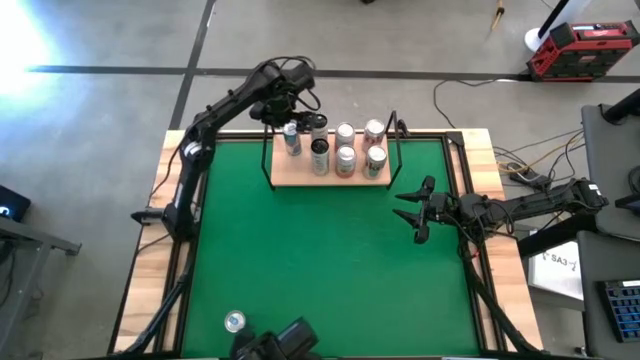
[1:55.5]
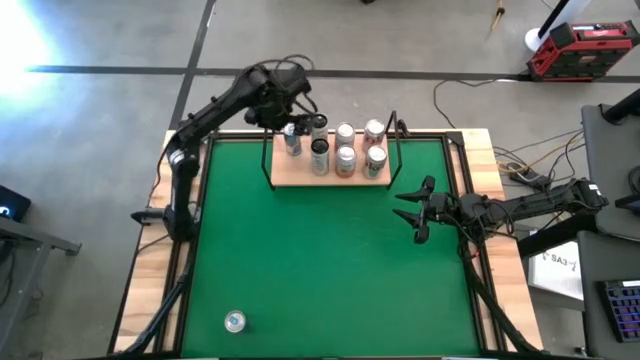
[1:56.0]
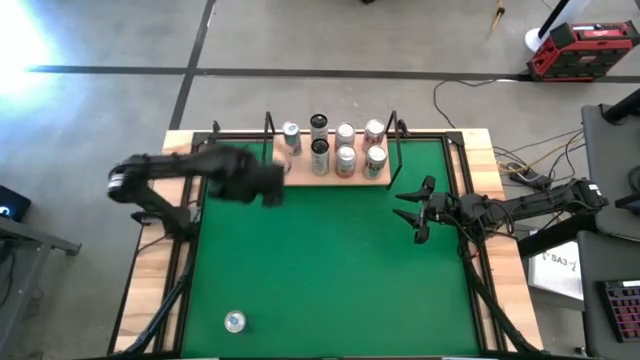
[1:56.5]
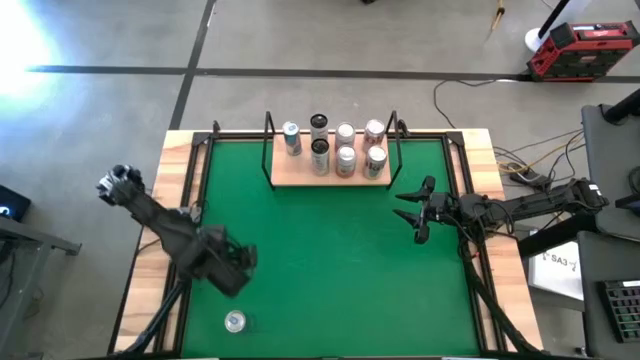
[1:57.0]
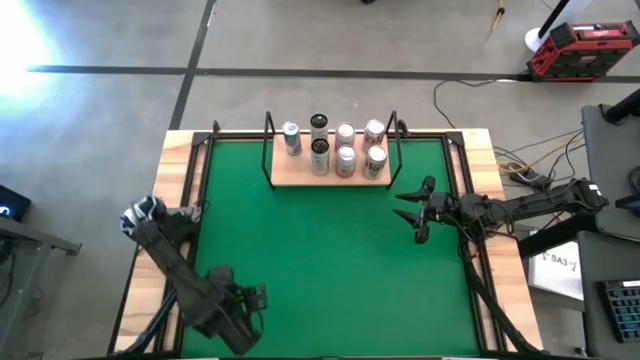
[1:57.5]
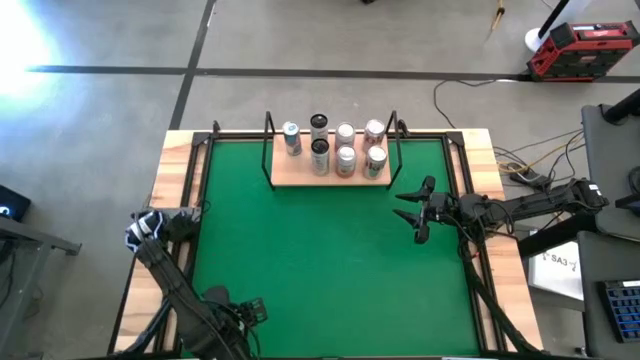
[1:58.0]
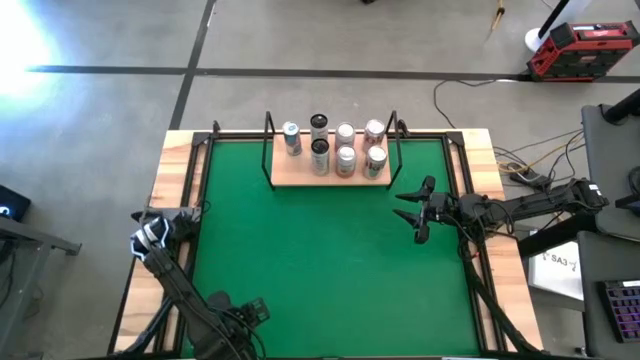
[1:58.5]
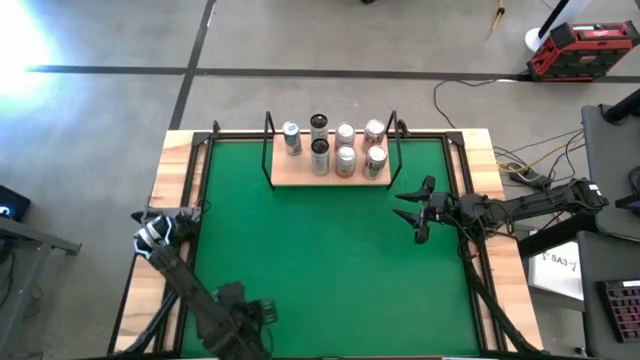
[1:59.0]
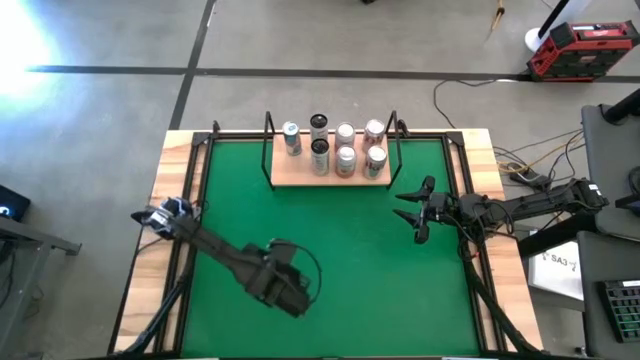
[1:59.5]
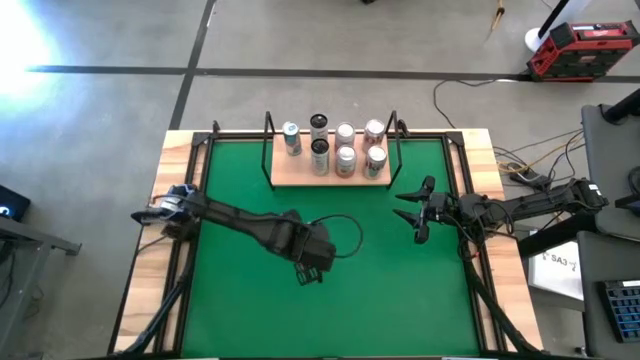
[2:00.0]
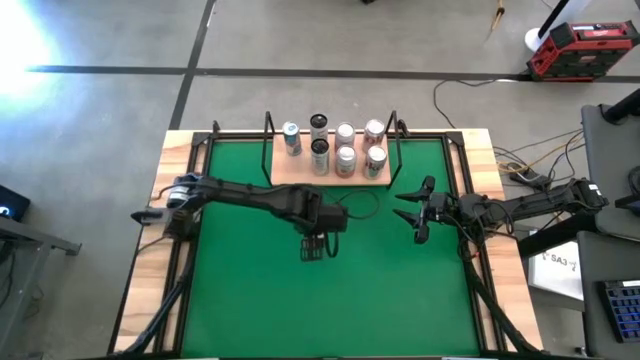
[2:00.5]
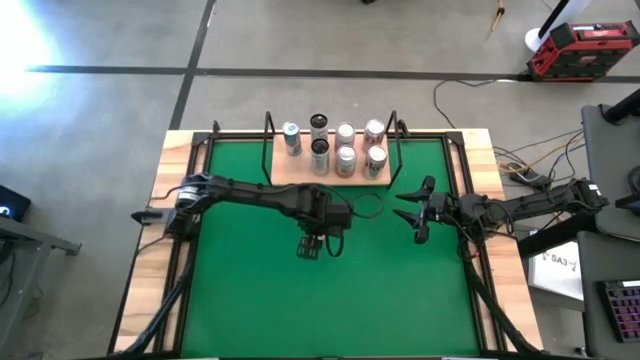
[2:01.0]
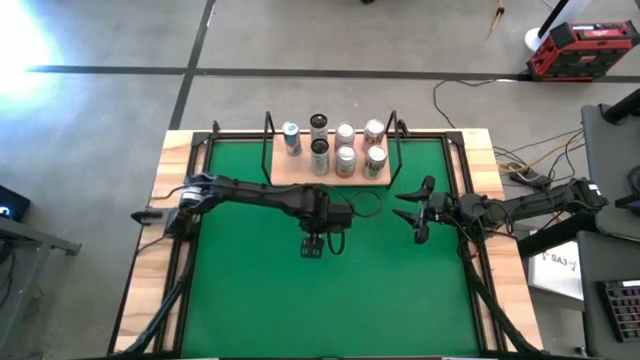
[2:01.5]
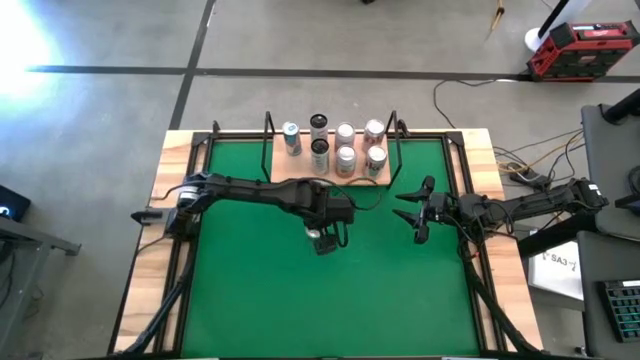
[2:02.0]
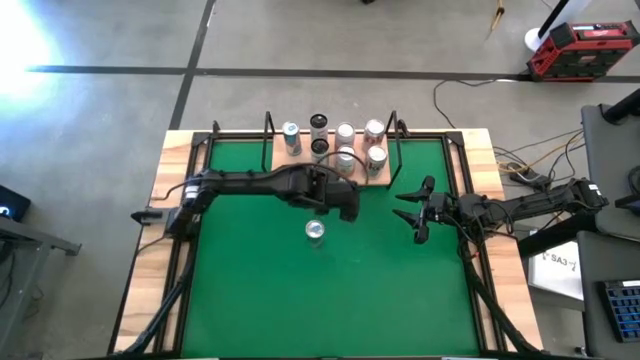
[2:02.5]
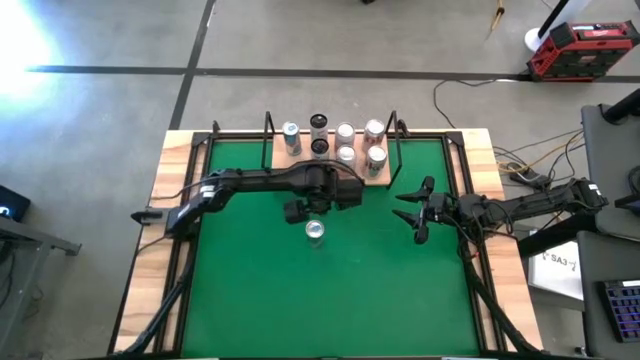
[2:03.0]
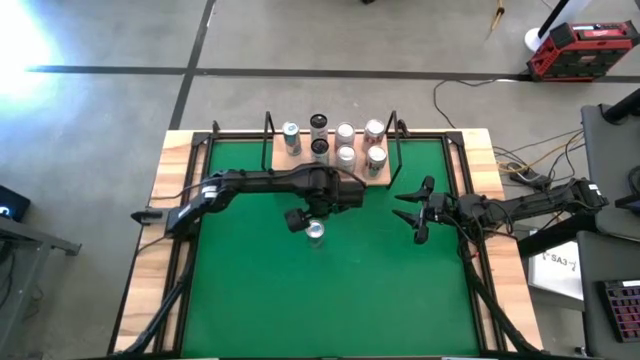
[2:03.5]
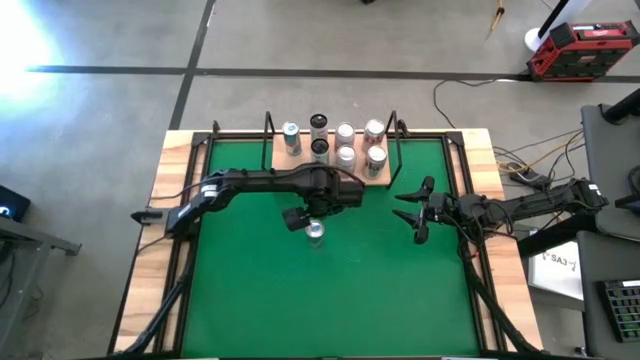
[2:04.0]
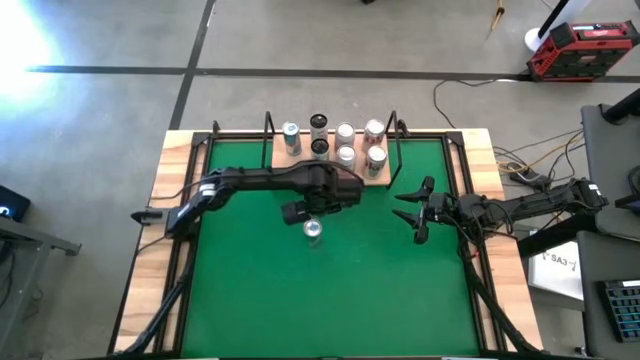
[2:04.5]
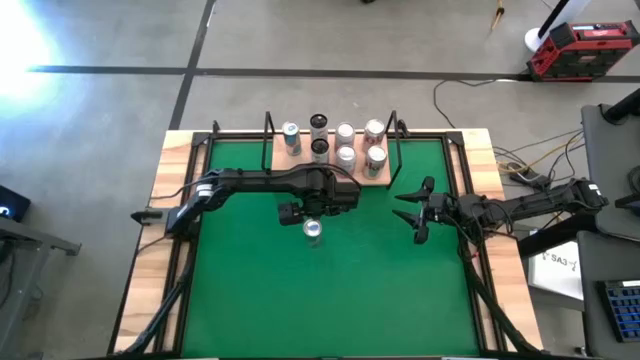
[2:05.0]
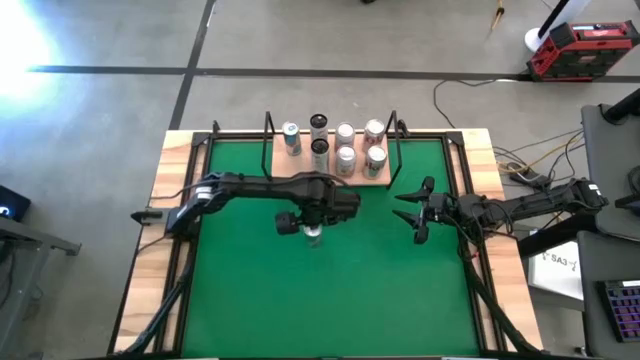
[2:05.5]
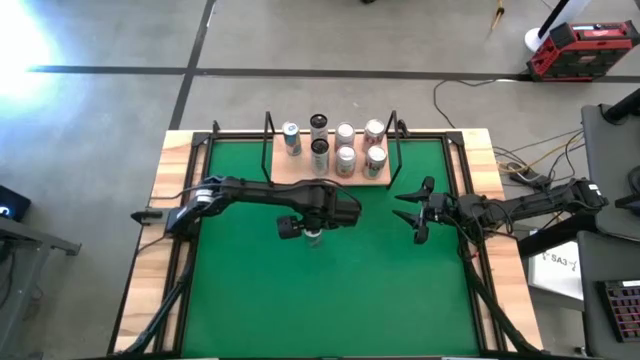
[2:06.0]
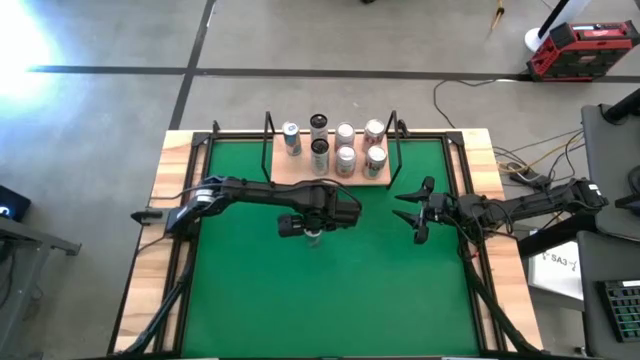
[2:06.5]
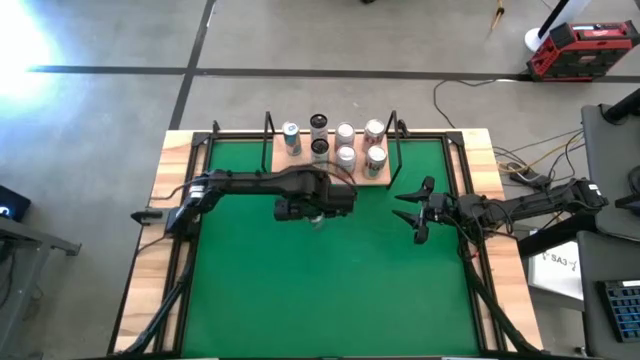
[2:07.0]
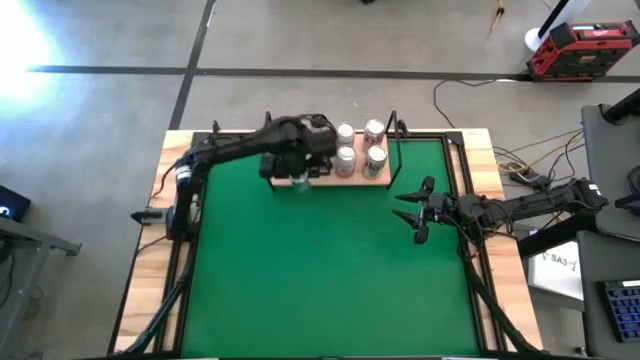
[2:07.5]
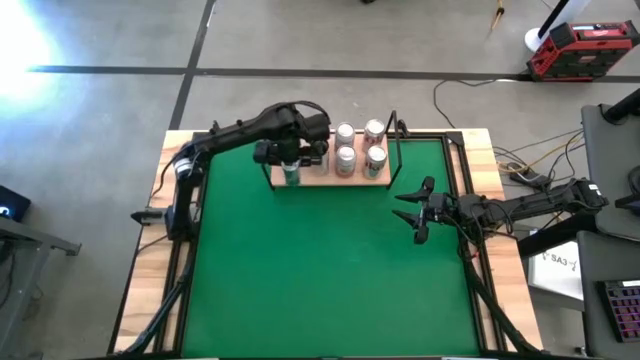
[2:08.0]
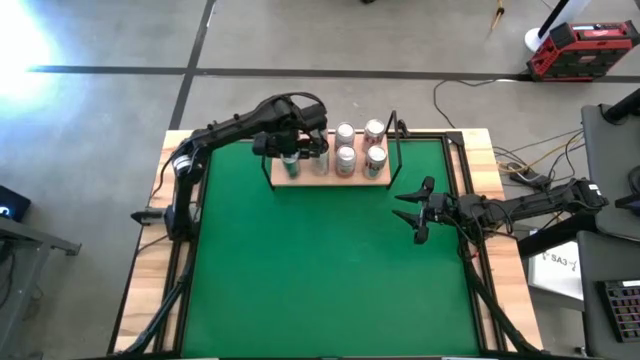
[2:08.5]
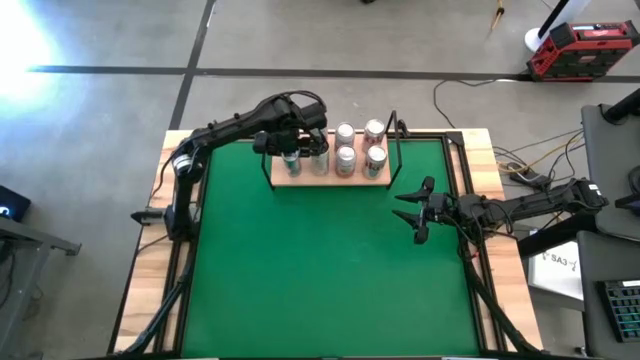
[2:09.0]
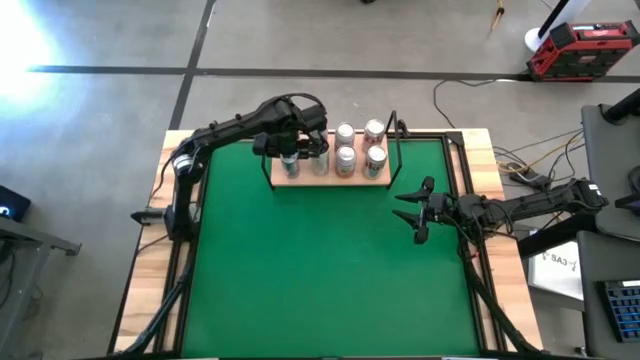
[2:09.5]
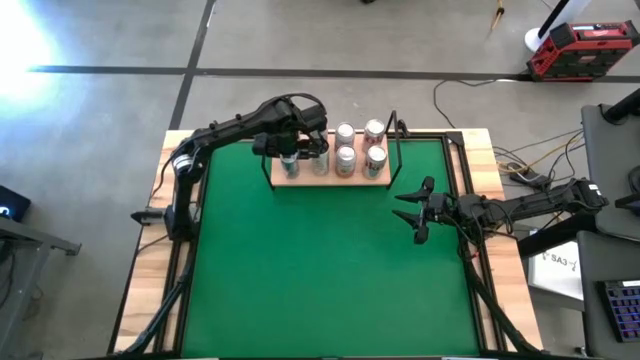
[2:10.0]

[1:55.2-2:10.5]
Task: Place canned beverage on shelf
Put the blue soda can on the shelf aligned with the other blue soda can

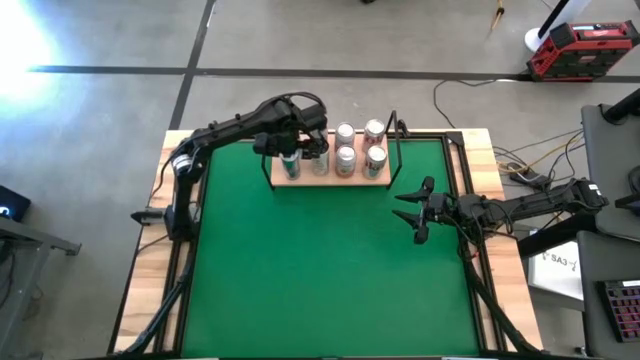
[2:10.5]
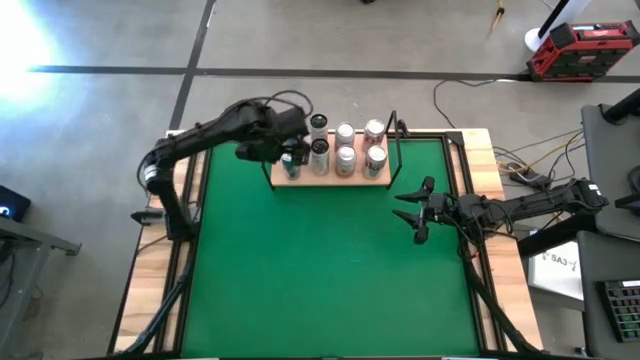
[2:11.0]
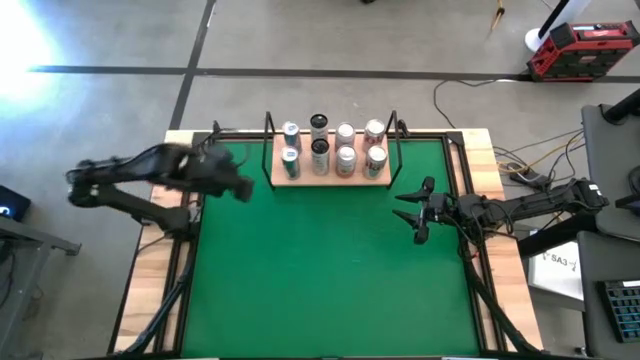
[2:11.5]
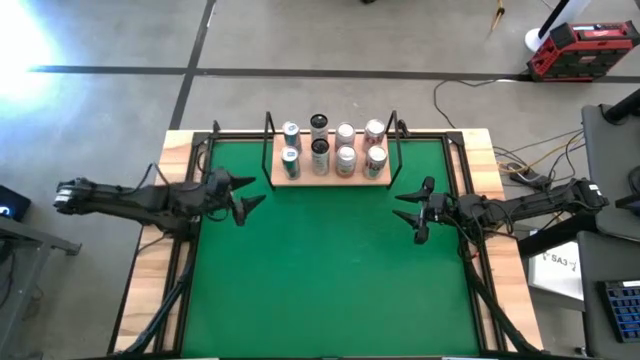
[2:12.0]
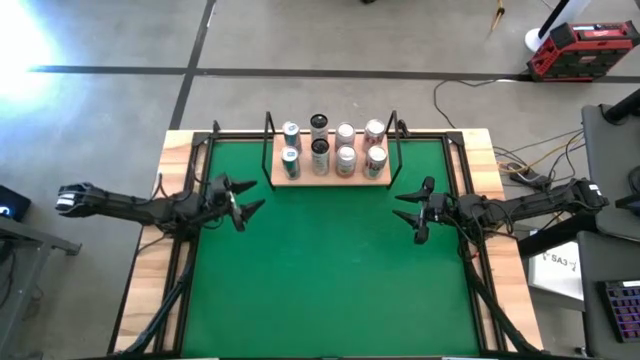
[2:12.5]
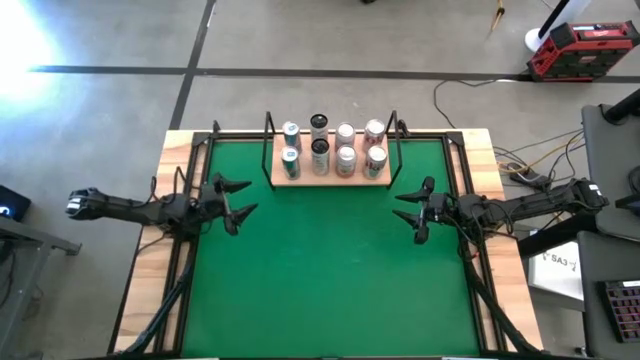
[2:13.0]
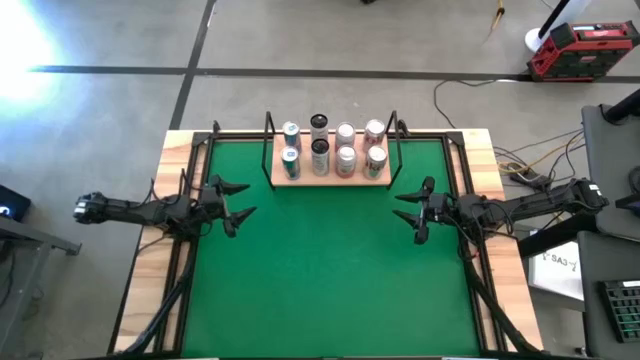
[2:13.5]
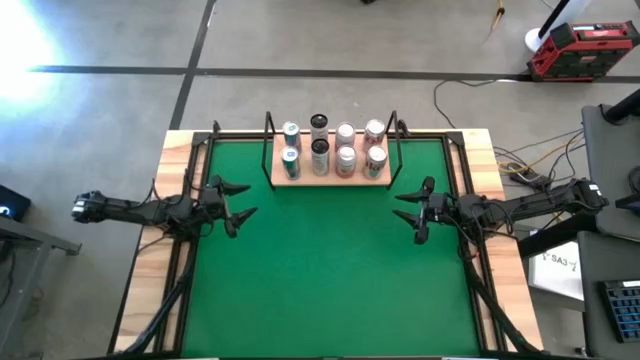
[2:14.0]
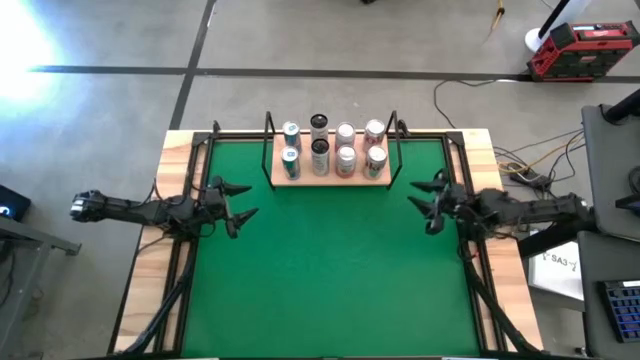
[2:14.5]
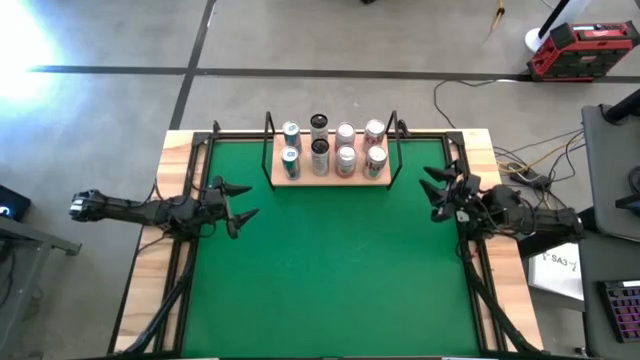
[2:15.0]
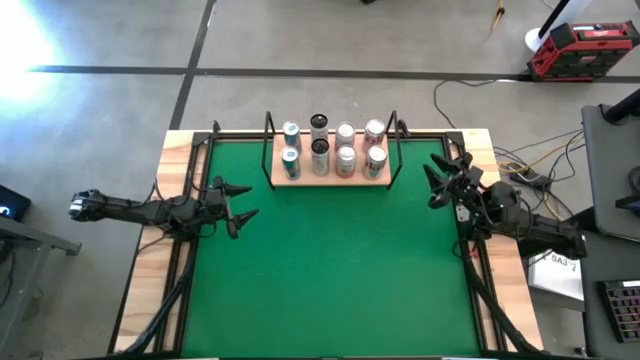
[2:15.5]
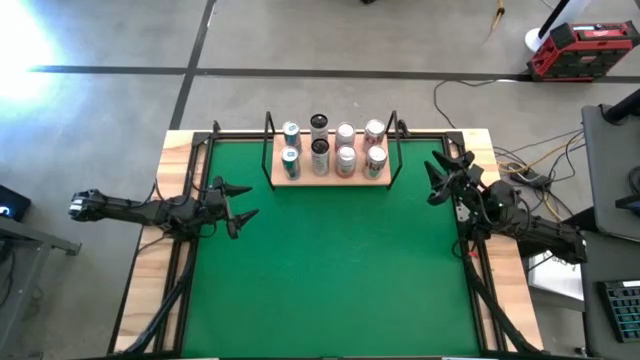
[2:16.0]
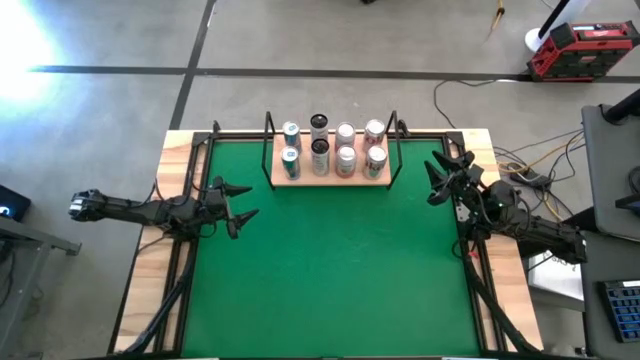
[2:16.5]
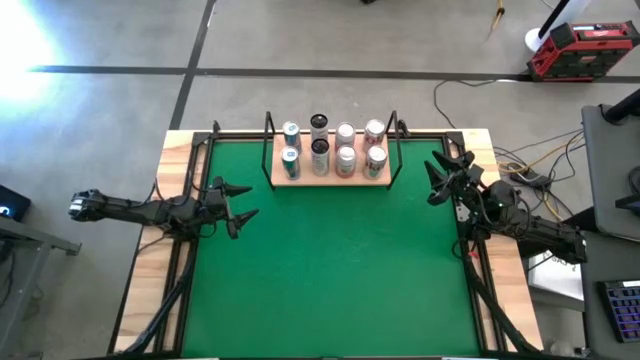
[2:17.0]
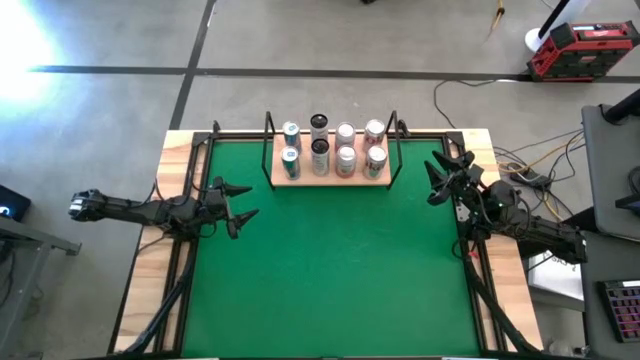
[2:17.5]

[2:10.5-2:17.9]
Return to home position
